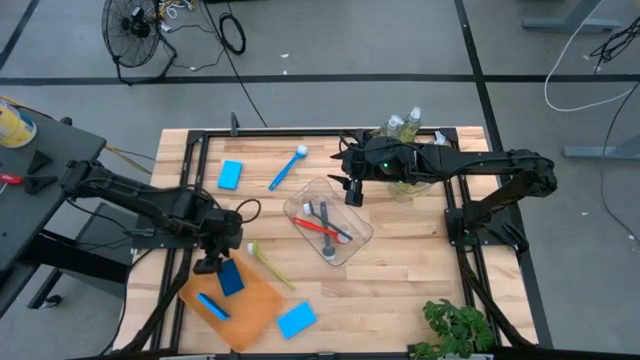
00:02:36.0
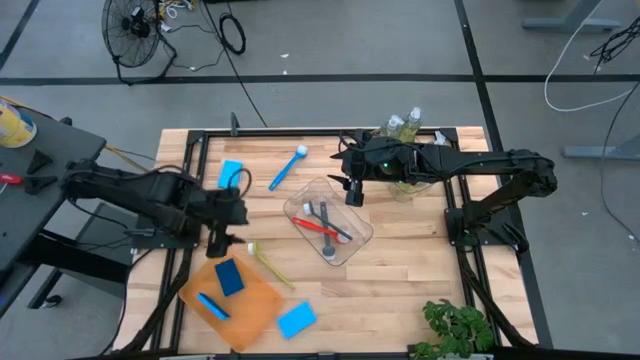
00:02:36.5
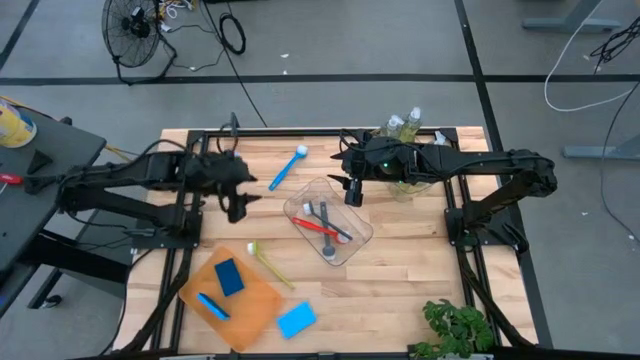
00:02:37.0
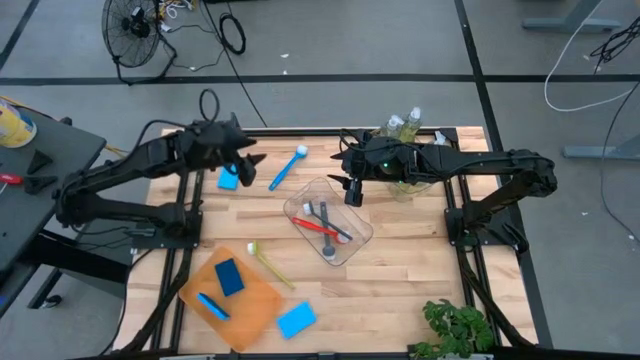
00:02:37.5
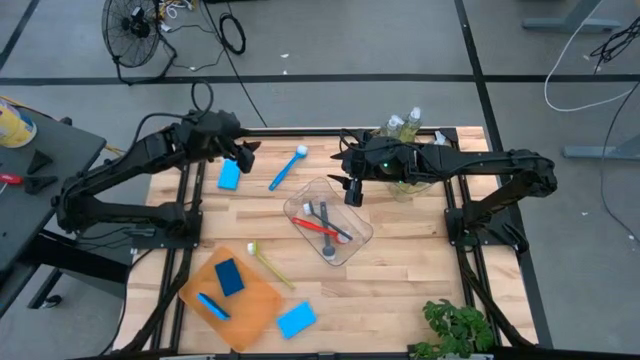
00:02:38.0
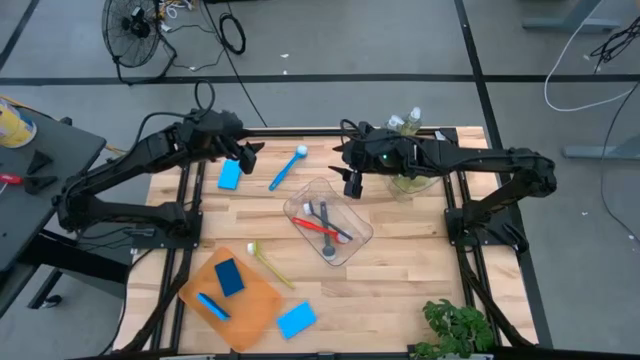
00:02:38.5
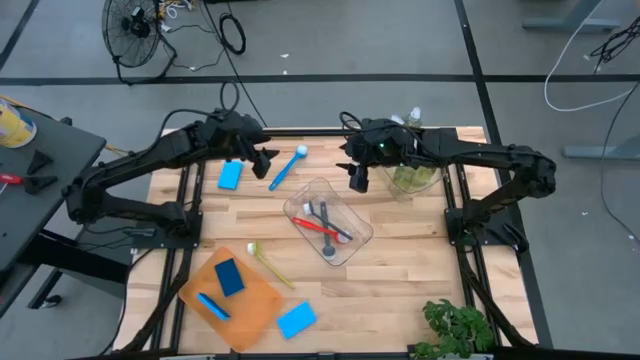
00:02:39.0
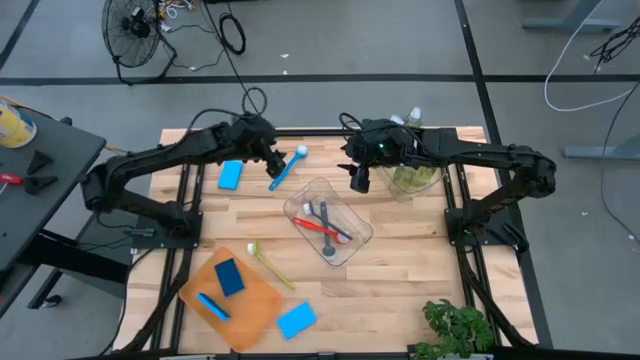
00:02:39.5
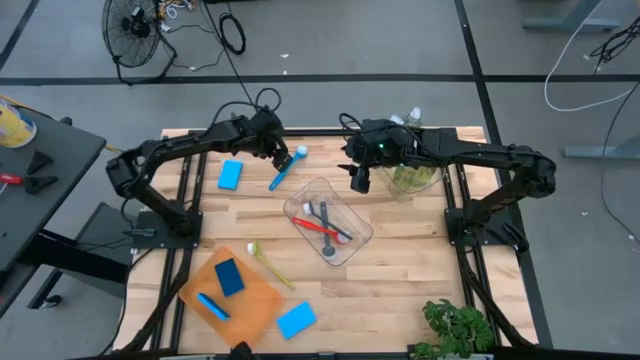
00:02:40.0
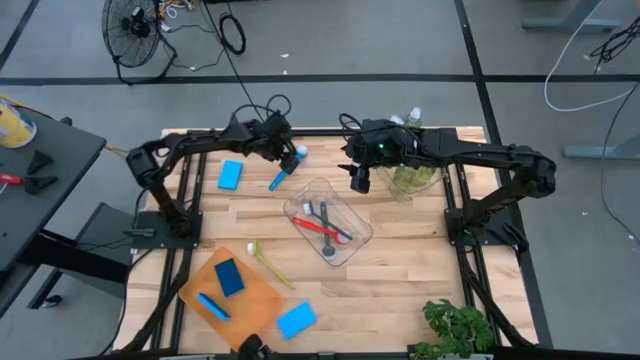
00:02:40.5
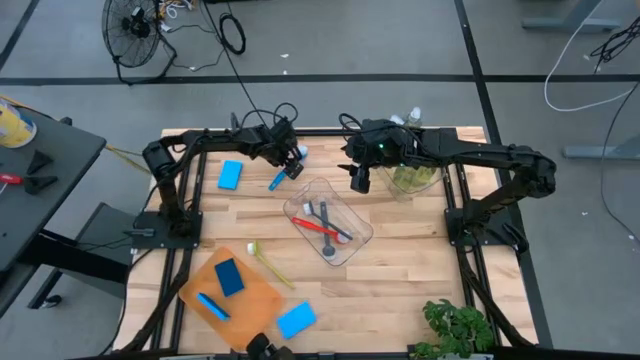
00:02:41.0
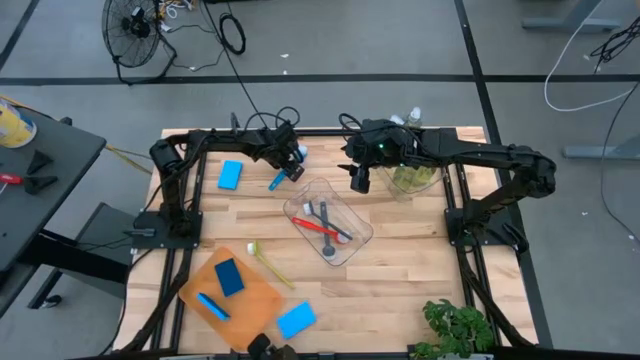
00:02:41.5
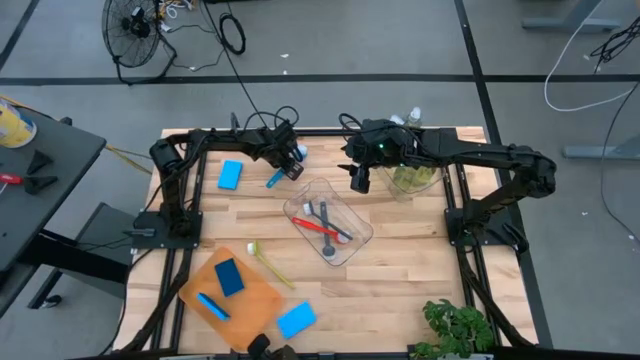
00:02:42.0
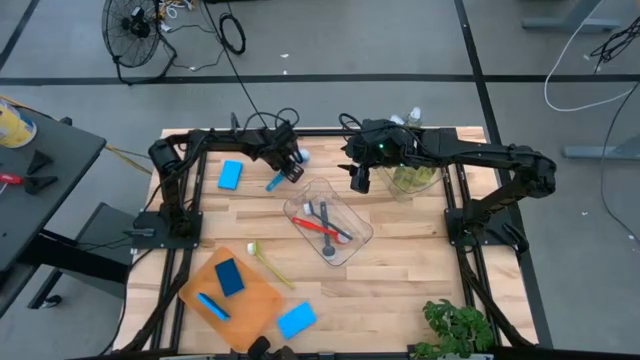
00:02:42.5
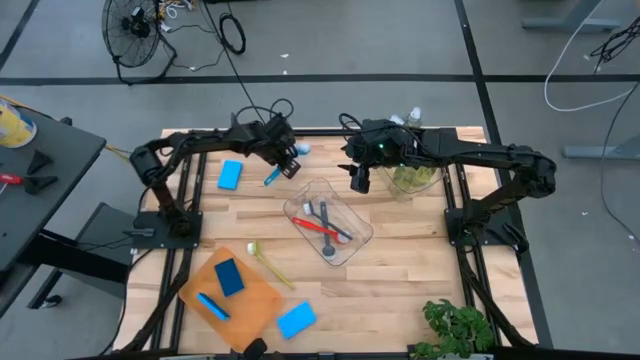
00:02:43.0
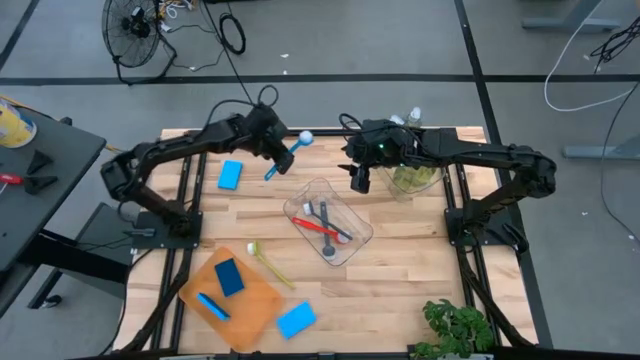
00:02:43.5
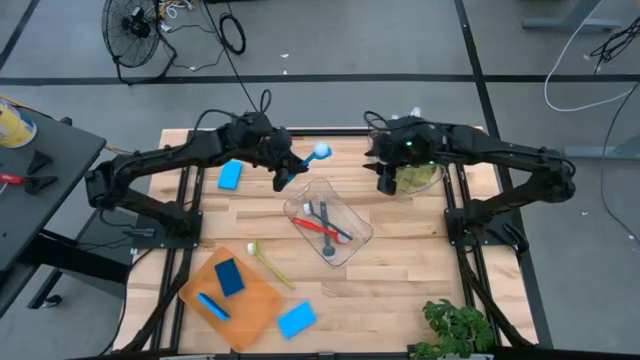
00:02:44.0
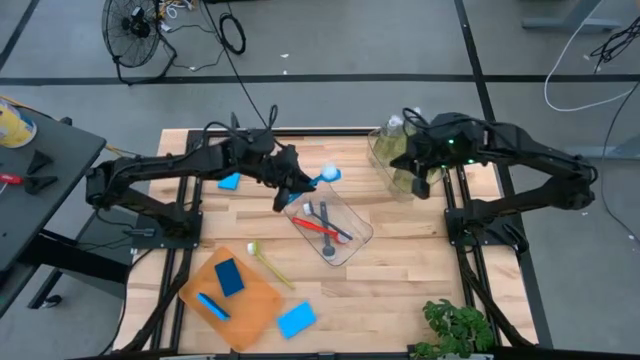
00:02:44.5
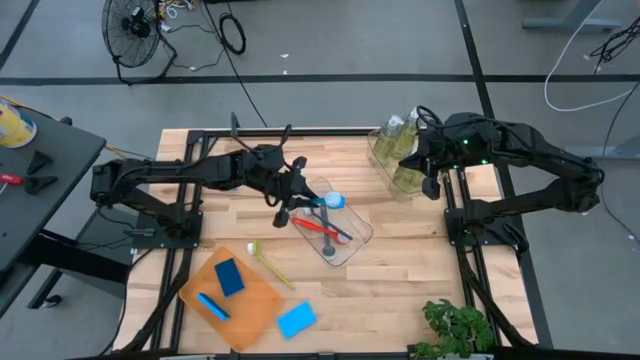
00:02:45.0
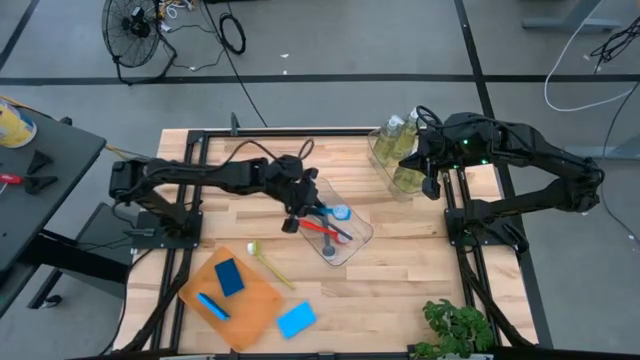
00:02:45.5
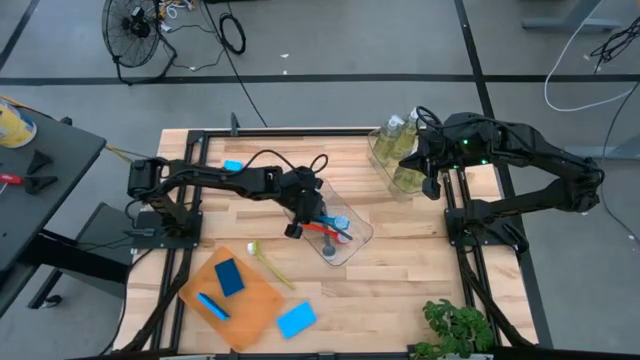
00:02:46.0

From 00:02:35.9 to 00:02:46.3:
Task: Pick & Place Kitchen Sink Supplies
Put the light blue sponge into the transparent orange bin

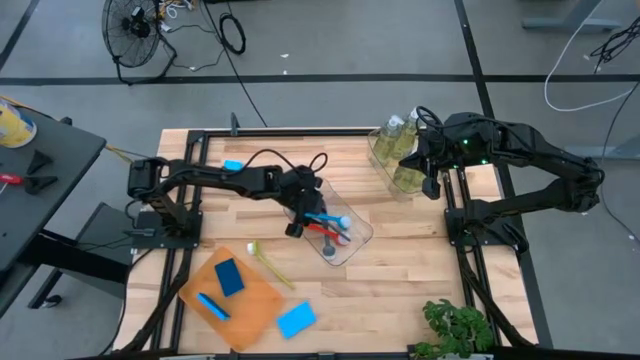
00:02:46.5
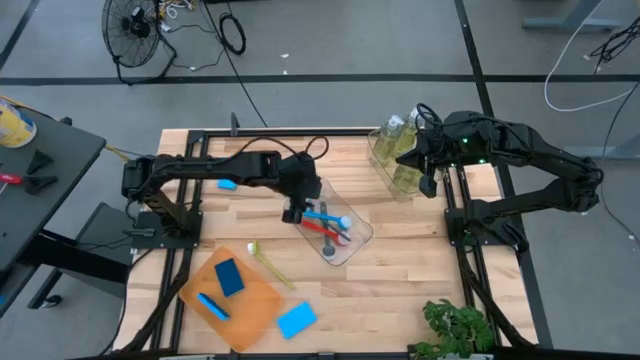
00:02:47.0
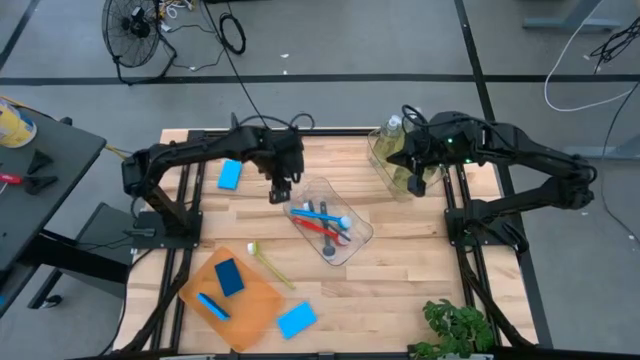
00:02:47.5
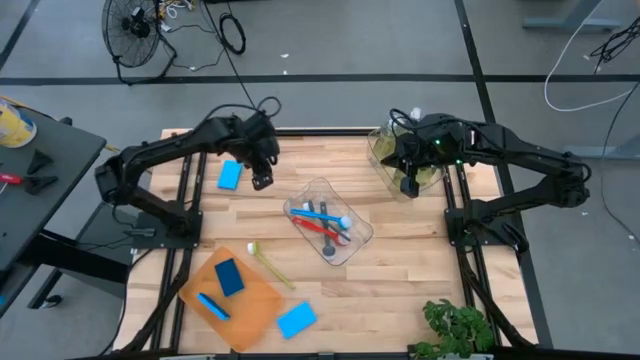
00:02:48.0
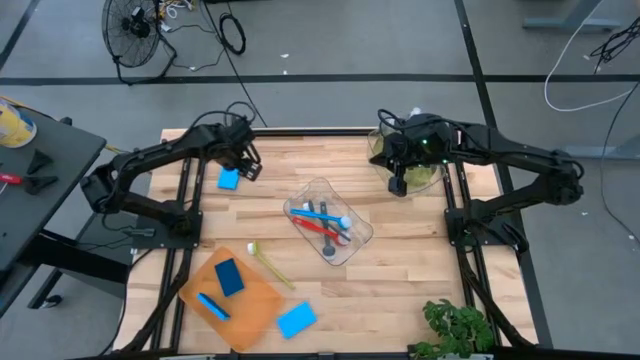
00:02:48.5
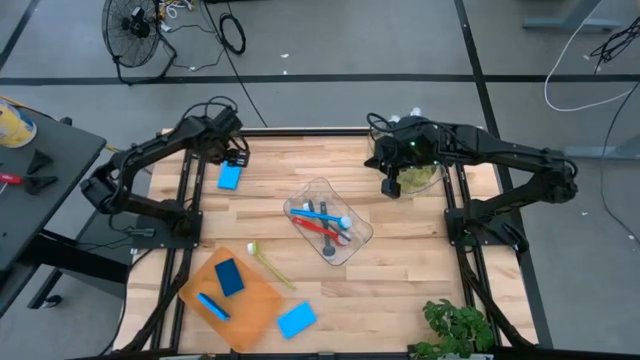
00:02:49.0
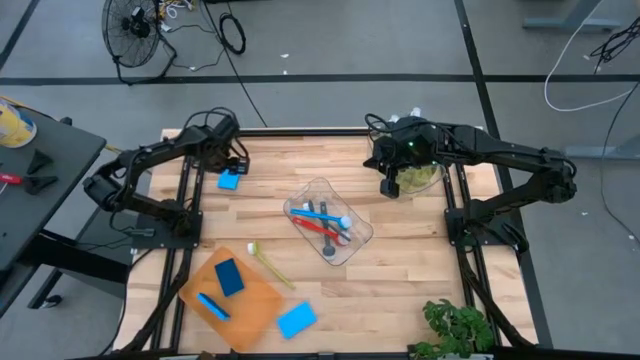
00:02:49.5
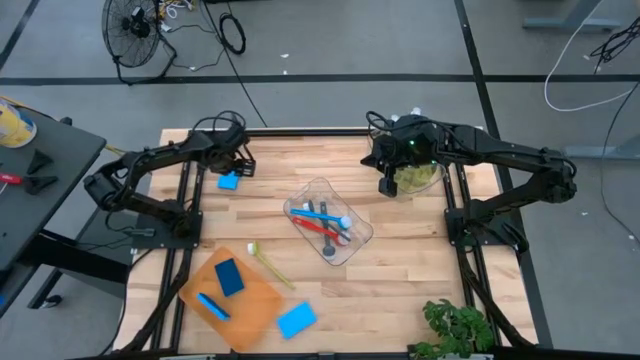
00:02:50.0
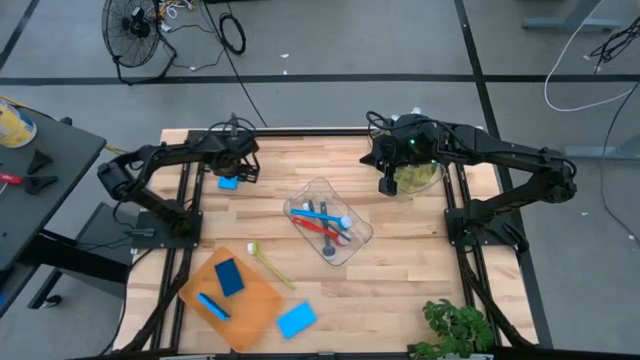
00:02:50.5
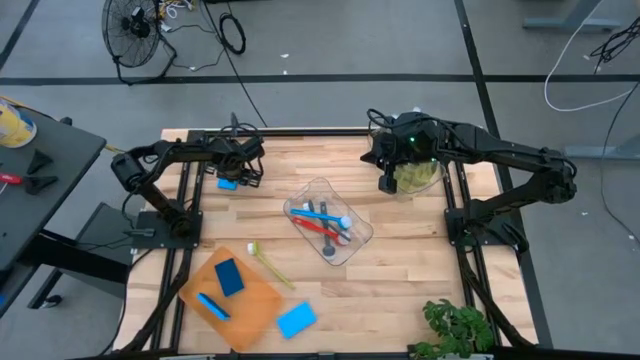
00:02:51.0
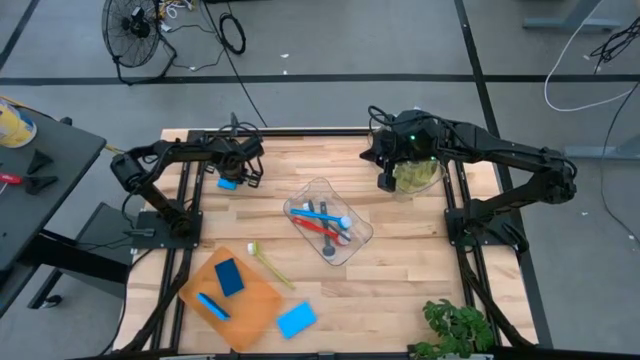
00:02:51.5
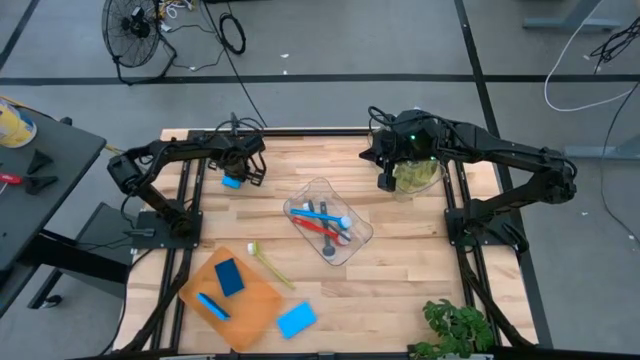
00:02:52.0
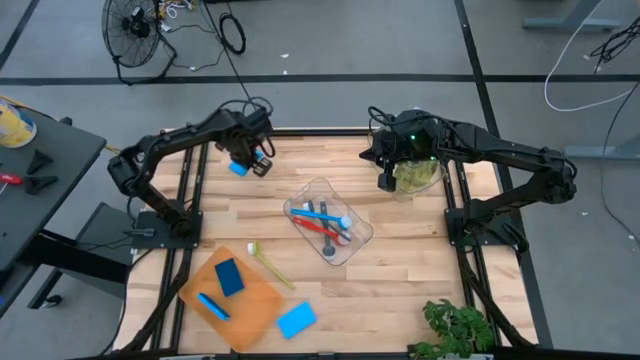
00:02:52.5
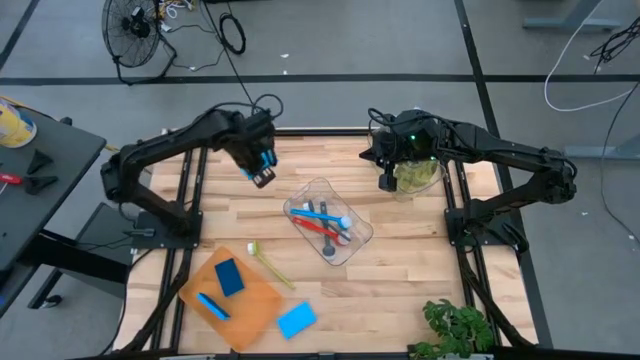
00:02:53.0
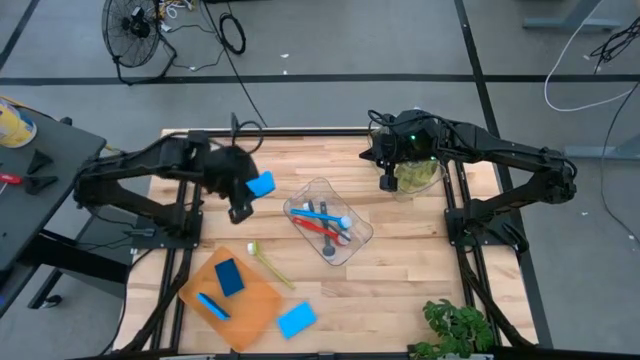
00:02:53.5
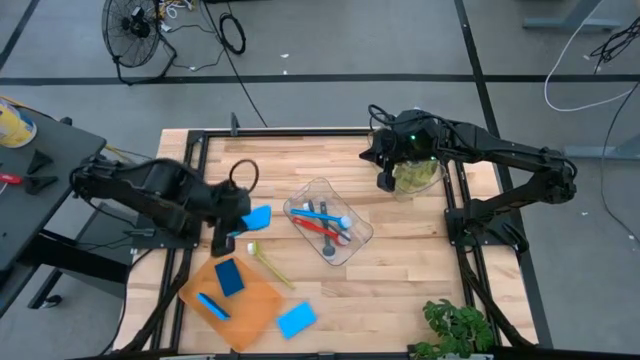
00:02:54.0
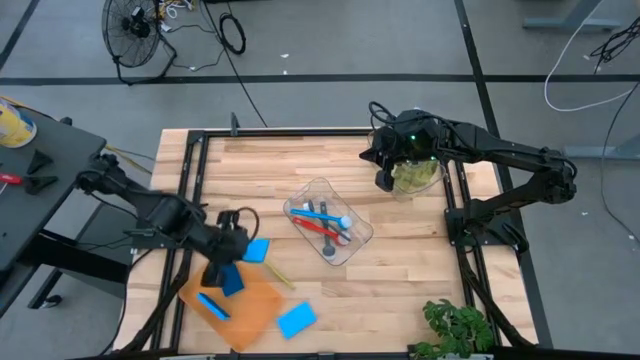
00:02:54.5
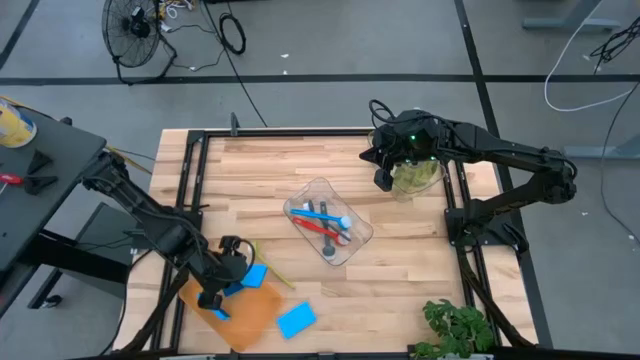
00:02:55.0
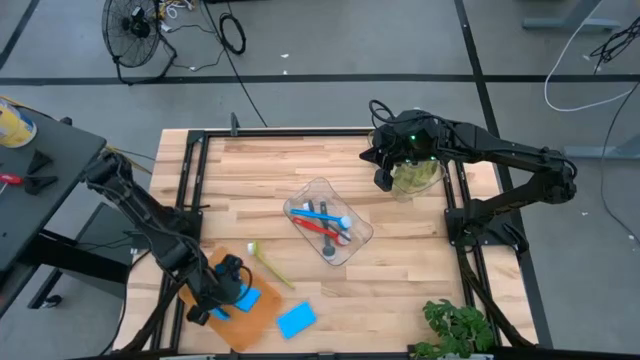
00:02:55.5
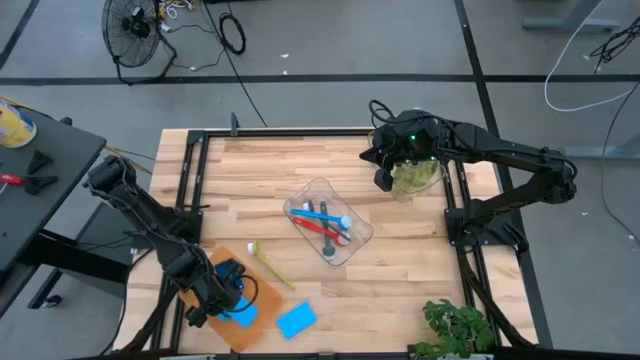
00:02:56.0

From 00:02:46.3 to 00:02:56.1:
Put the blue sponge into the transparent orange bin

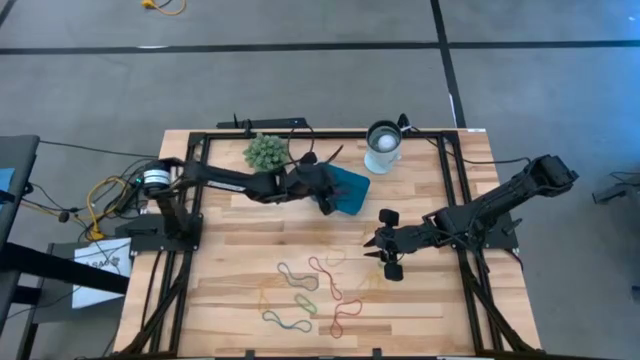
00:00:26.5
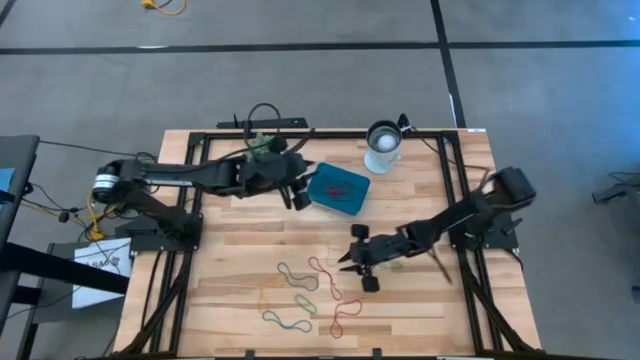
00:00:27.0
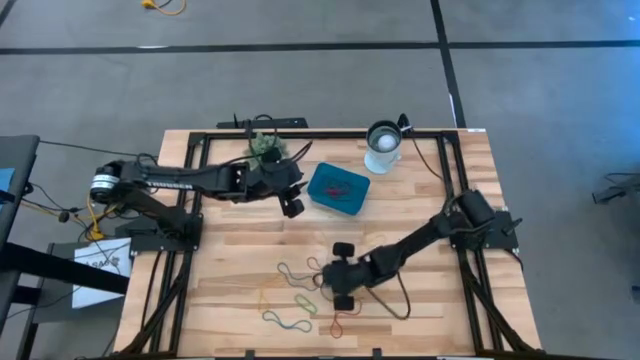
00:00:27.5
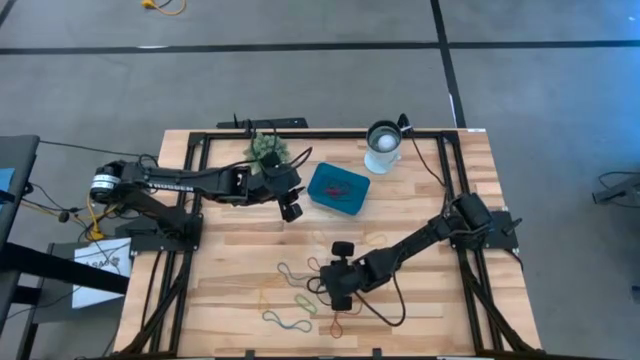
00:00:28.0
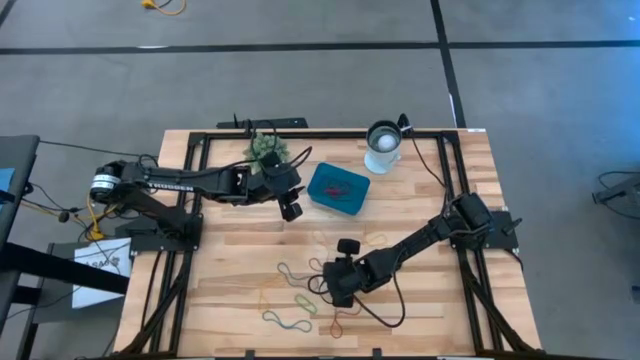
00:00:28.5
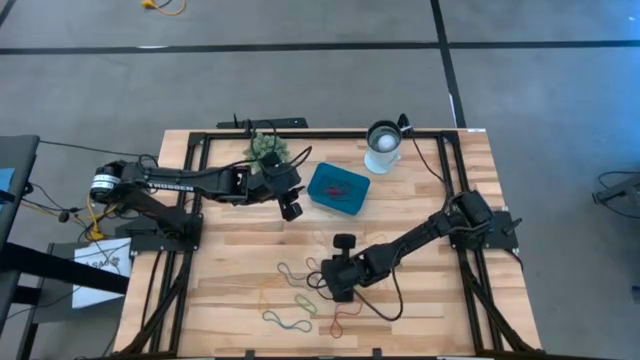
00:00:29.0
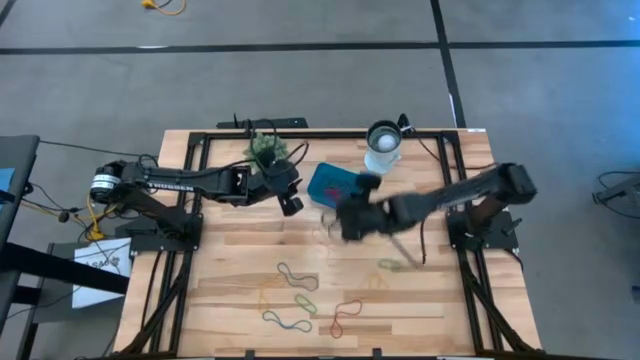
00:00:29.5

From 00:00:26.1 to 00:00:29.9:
Task: Pick and place items into bin
Put the red rubber band into the blue bin
